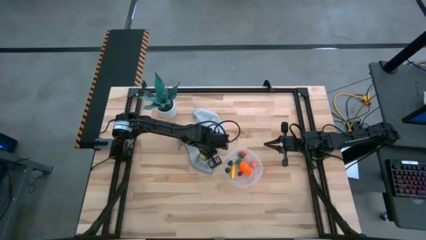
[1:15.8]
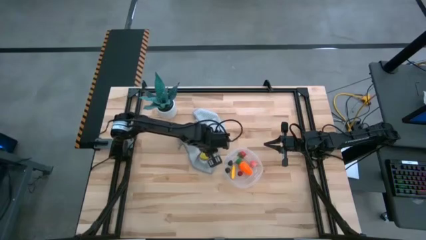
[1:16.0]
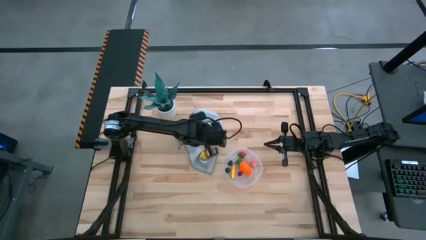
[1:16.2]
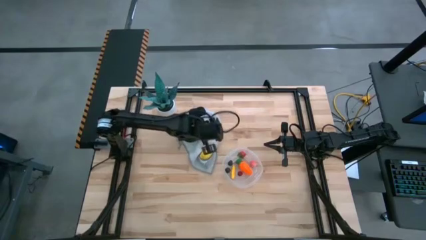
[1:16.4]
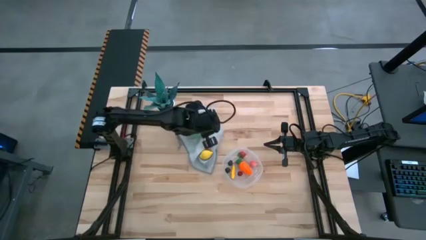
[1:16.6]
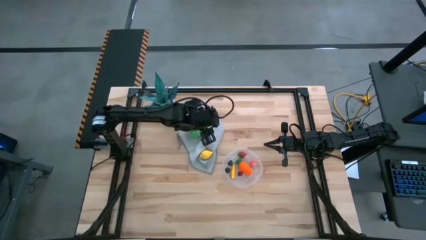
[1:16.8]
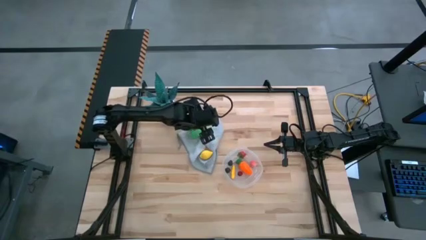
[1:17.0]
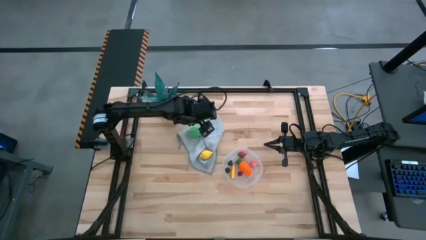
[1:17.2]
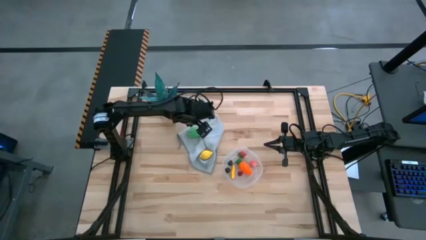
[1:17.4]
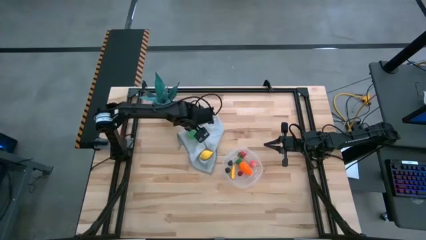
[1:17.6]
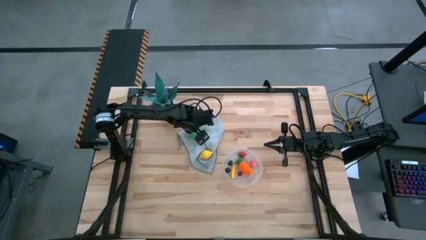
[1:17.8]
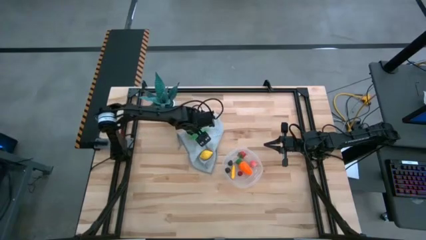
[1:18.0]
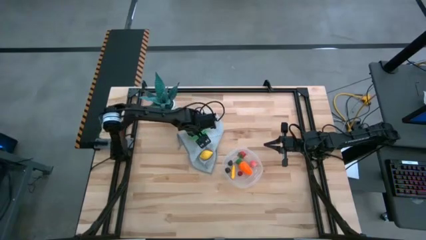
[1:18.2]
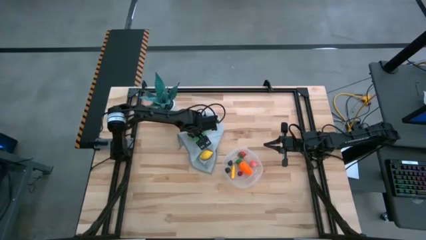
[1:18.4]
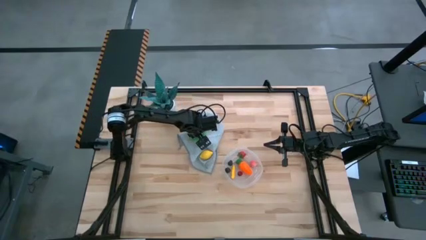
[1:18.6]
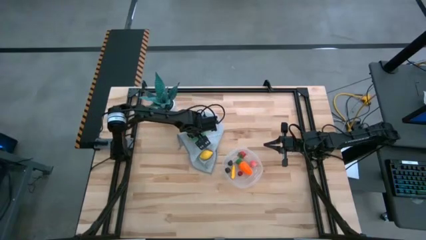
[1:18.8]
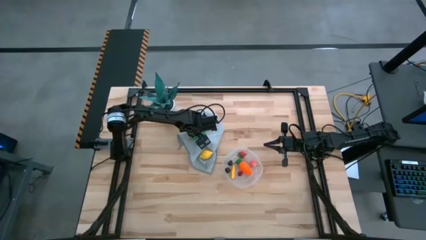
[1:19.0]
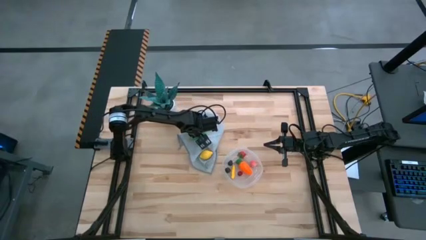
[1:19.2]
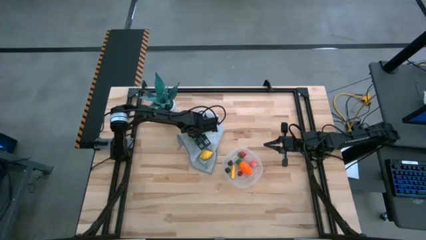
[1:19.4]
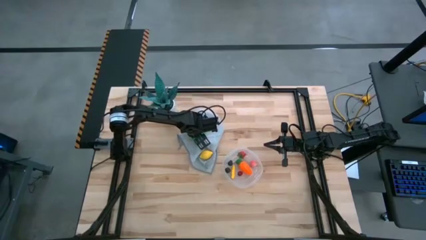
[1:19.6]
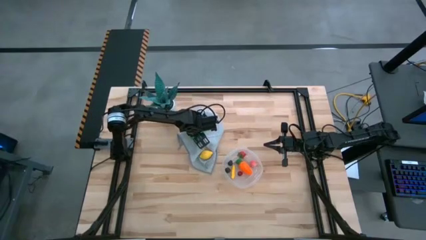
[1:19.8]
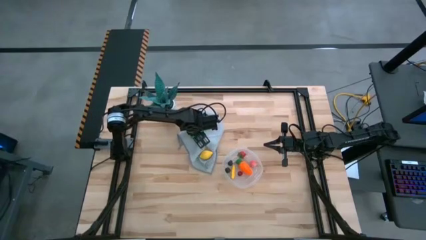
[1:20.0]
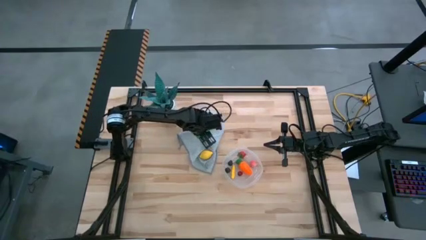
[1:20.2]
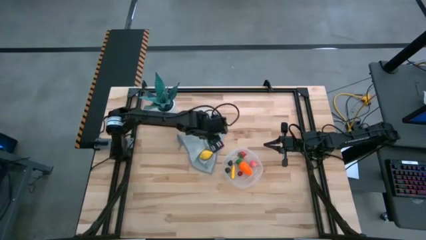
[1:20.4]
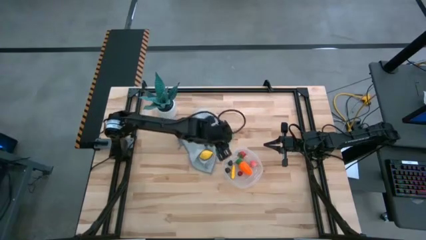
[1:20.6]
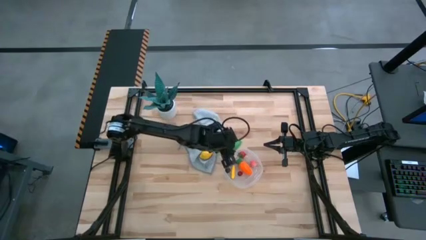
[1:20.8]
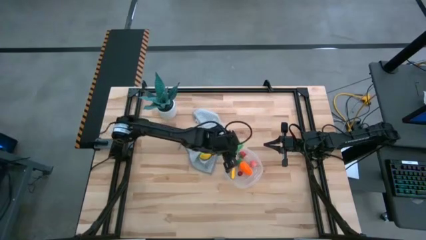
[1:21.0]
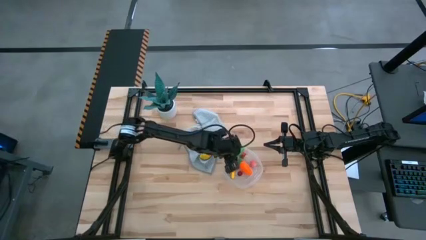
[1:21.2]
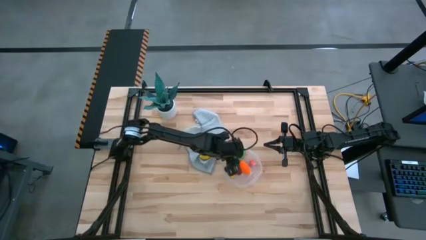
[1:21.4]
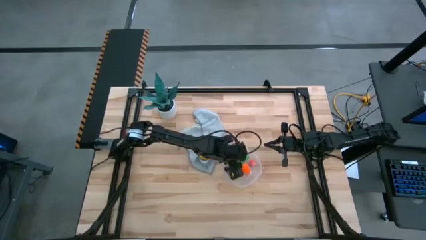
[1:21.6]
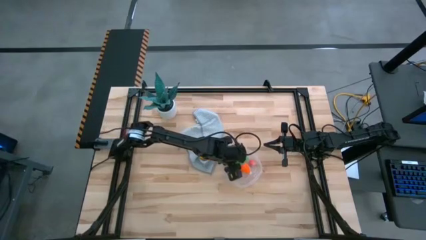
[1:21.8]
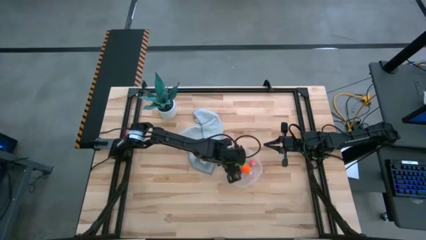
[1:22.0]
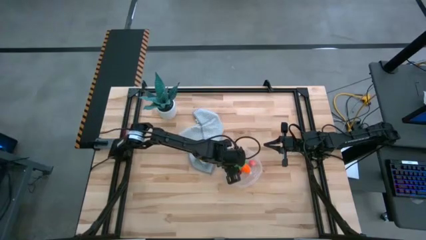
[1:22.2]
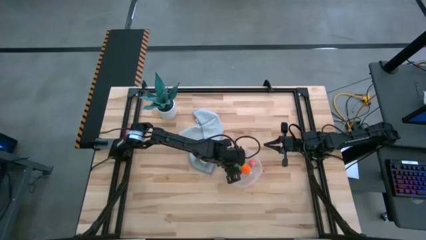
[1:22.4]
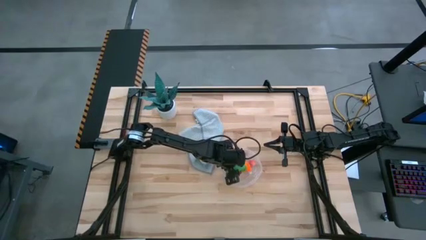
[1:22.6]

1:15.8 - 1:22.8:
Task: Pick and placing Produce into tupperware
Put the green corn into the transparent bin

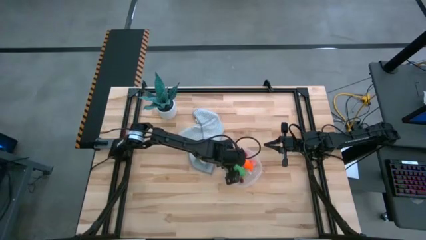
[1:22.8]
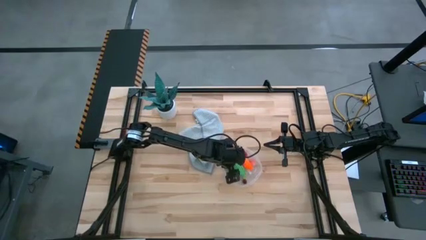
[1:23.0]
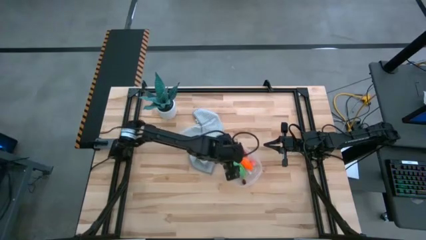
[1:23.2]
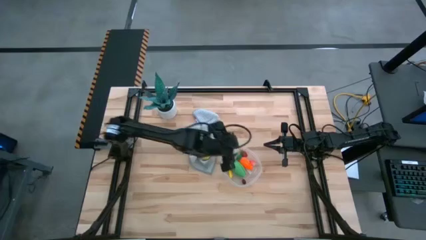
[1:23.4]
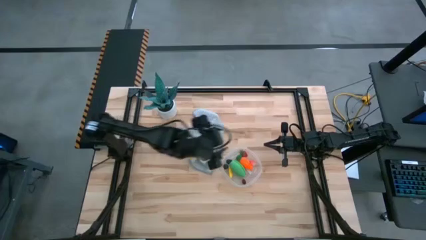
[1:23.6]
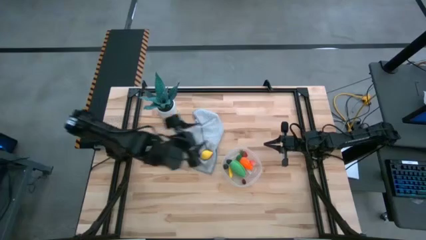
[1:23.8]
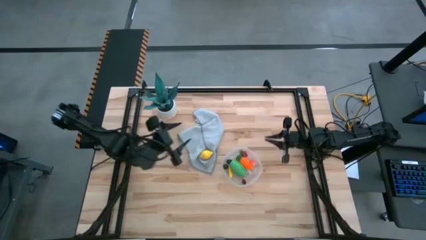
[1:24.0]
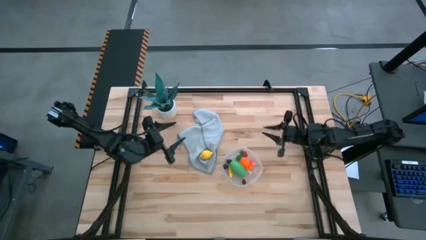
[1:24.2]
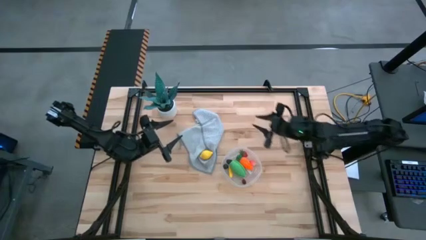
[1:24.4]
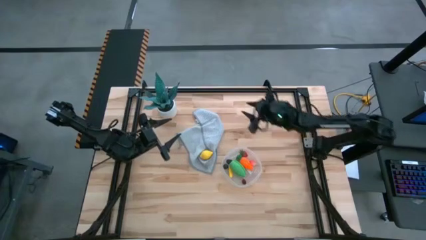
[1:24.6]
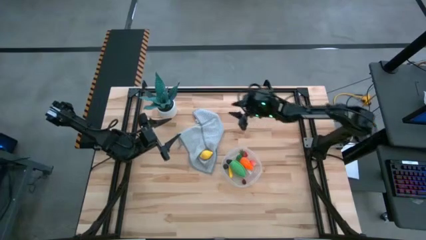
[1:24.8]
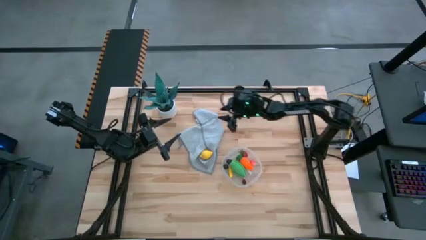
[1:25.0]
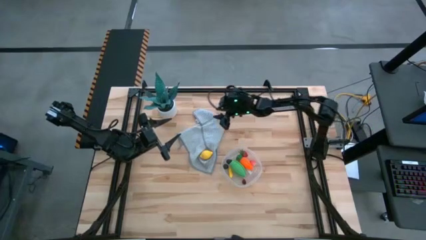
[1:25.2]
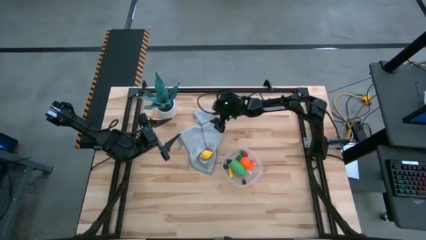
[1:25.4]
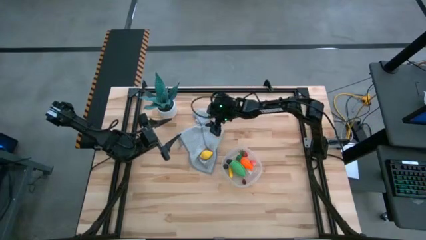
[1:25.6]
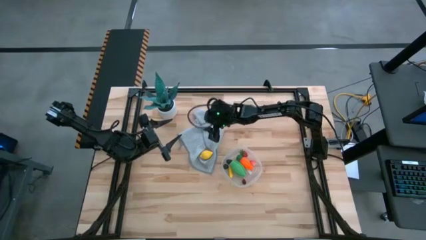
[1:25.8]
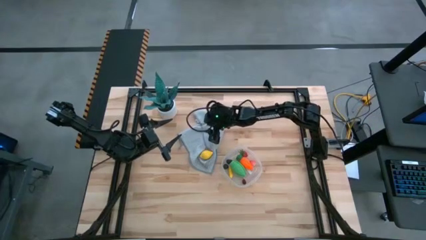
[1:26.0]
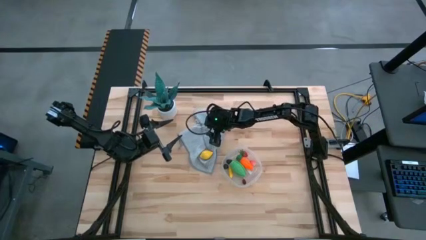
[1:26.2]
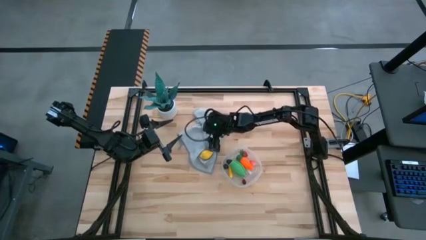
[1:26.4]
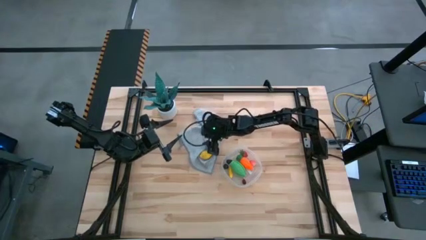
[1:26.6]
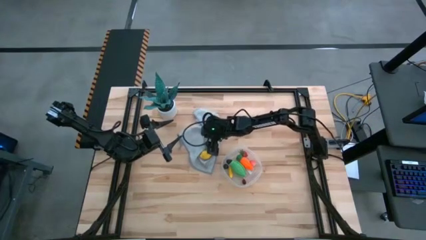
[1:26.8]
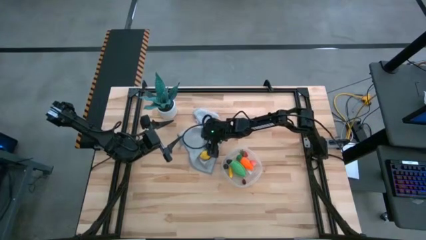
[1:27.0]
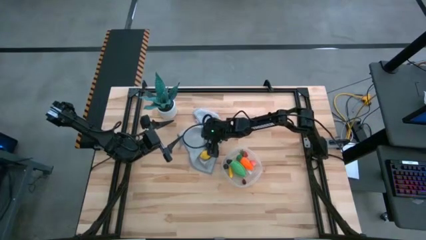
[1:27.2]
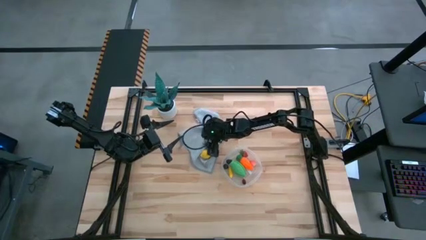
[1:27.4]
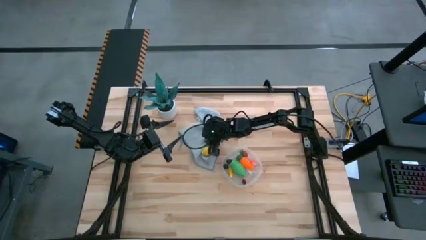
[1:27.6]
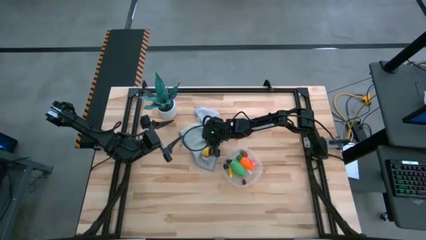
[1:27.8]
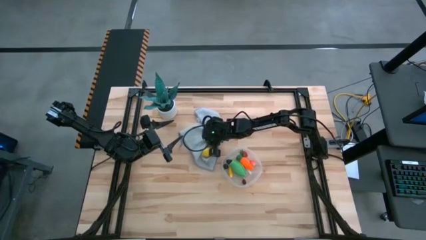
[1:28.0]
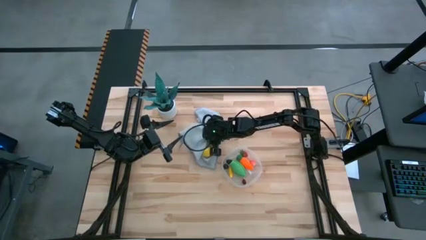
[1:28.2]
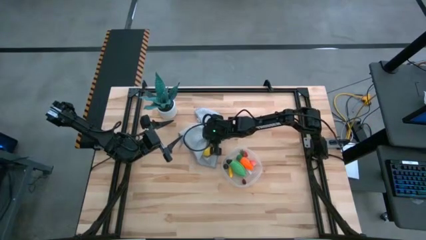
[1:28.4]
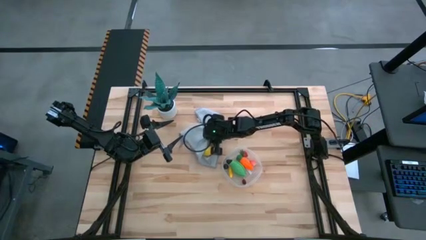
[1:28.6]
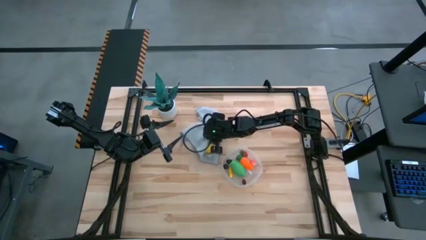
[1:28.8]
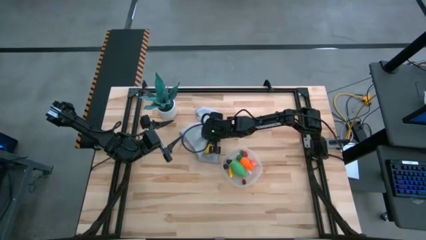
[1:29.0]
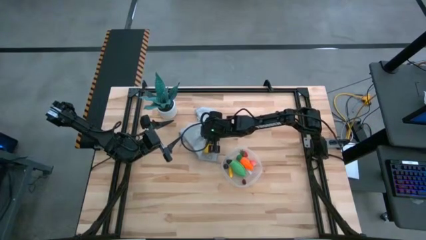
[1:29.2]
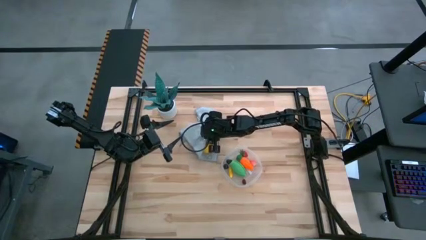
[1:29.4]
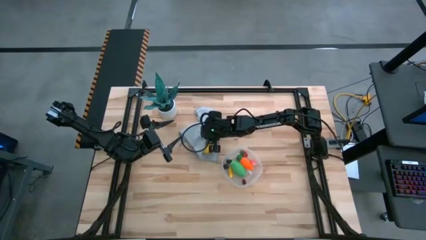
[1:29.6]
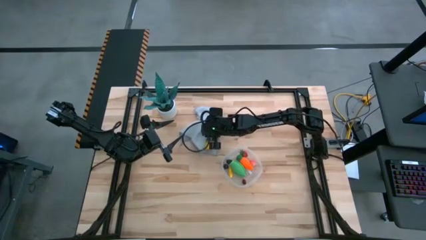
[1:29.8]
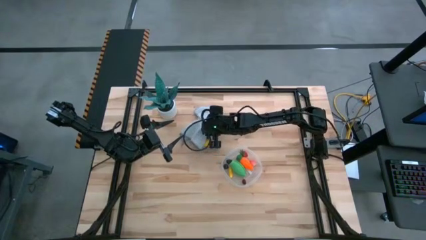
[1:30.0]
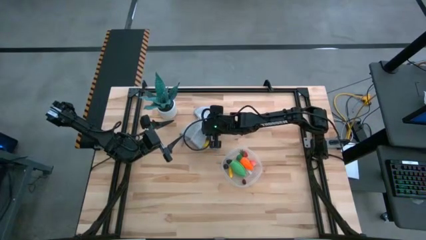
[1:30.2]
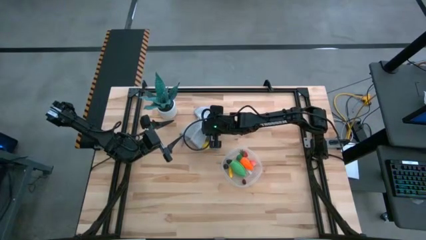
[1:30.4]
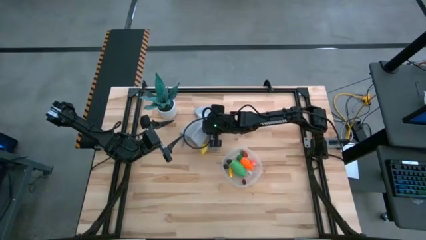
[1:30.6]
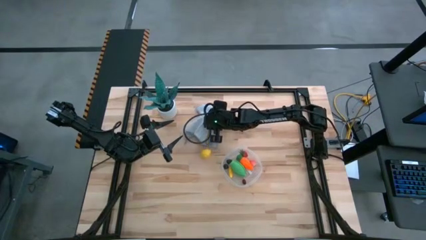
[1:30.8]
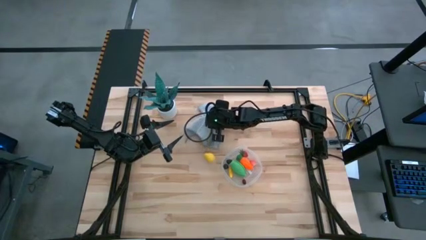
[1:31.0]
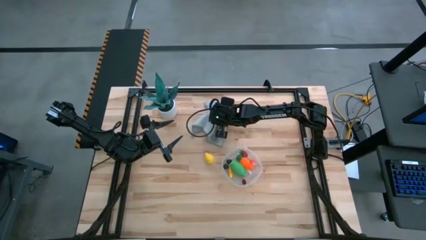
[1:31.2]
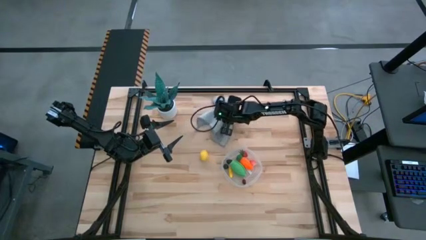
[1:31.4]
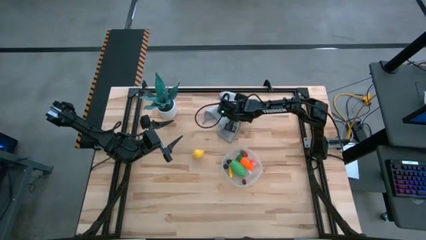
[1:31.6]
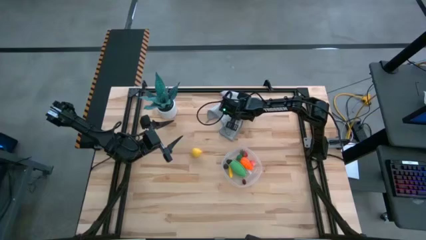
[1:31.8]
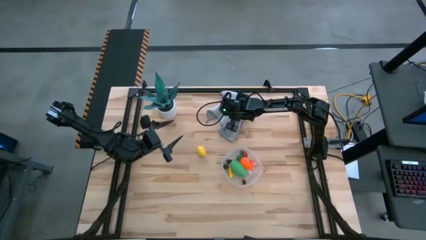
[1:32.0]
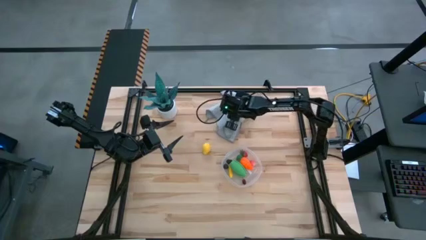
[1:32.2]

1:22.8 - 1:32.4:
Move the gray towel to the top center of the table
